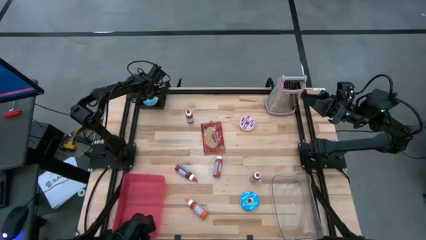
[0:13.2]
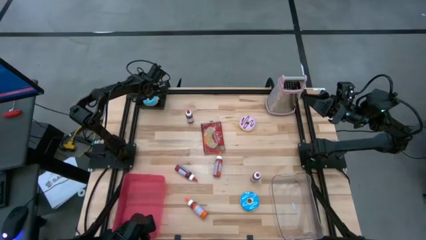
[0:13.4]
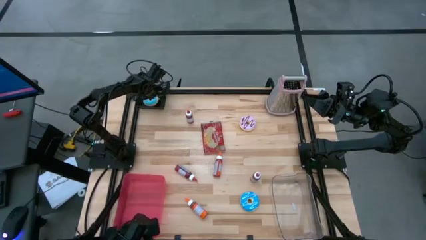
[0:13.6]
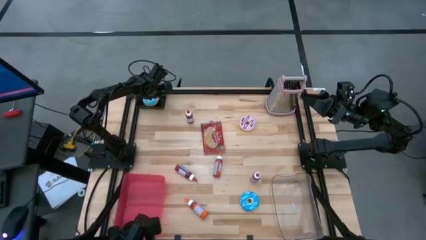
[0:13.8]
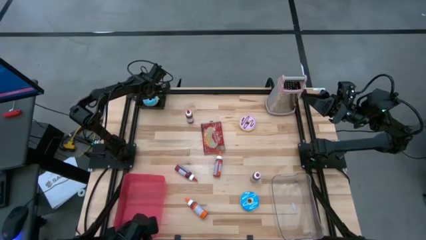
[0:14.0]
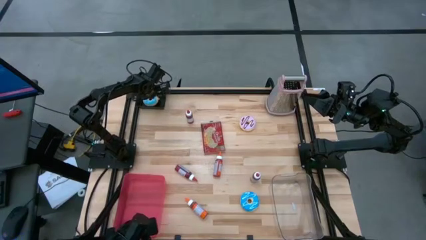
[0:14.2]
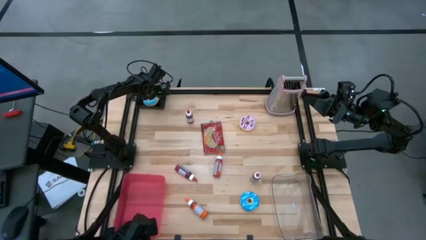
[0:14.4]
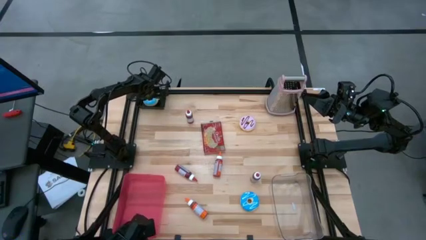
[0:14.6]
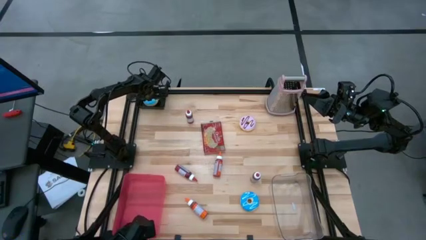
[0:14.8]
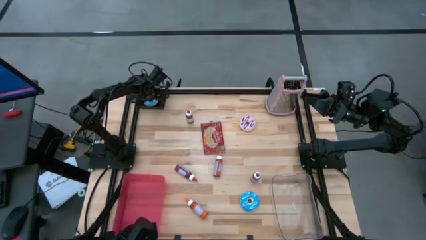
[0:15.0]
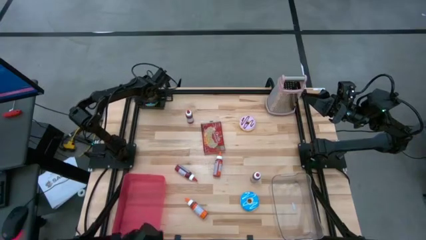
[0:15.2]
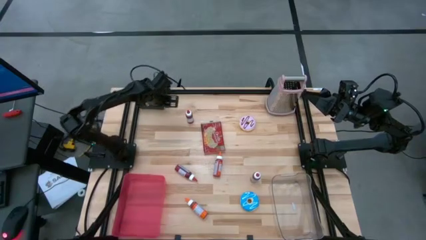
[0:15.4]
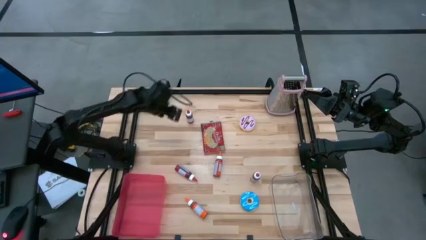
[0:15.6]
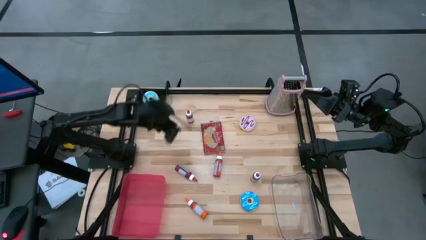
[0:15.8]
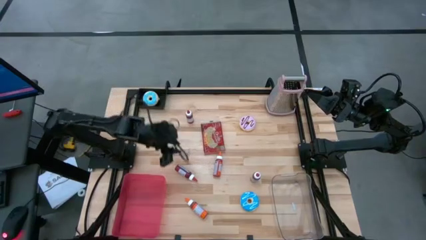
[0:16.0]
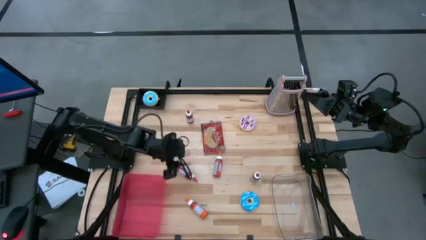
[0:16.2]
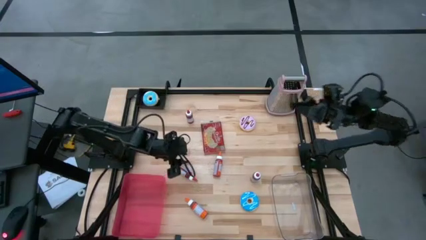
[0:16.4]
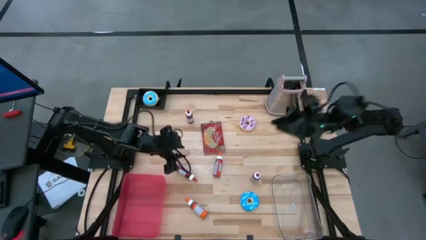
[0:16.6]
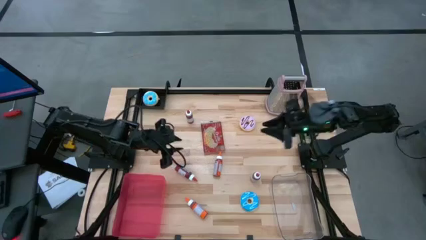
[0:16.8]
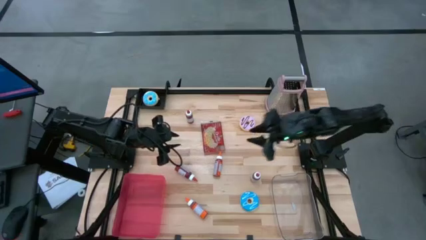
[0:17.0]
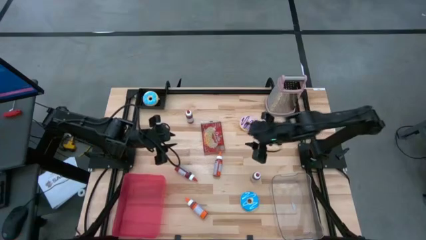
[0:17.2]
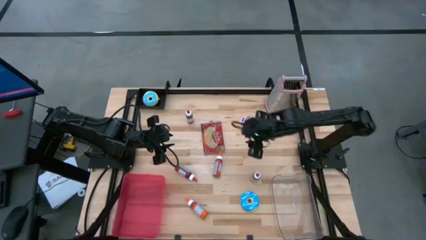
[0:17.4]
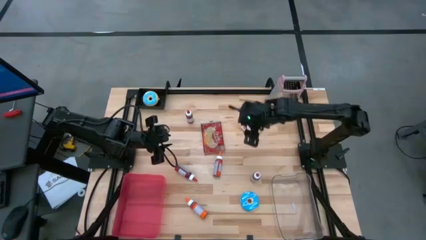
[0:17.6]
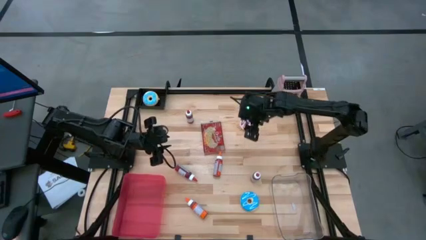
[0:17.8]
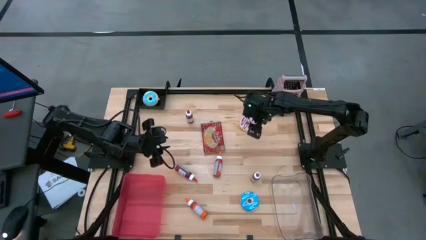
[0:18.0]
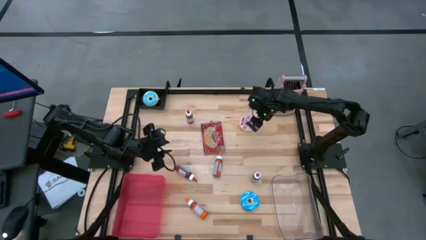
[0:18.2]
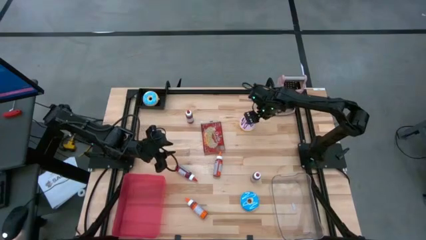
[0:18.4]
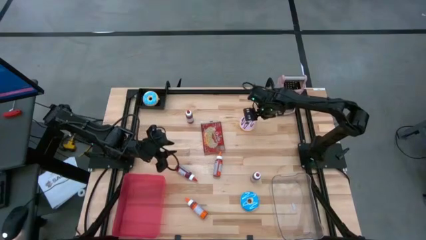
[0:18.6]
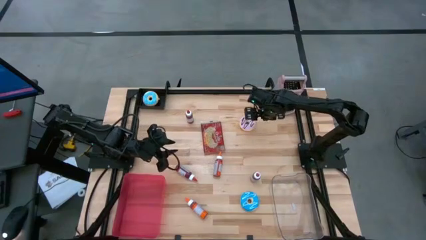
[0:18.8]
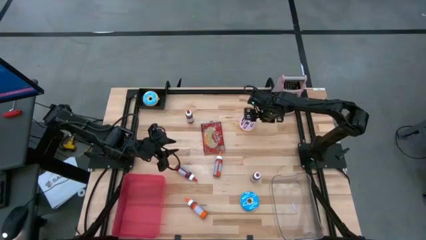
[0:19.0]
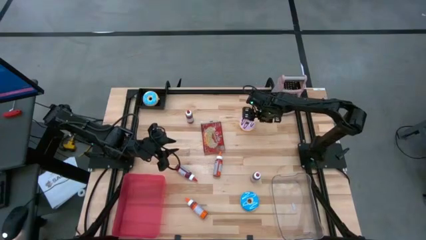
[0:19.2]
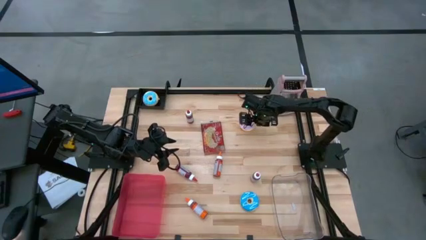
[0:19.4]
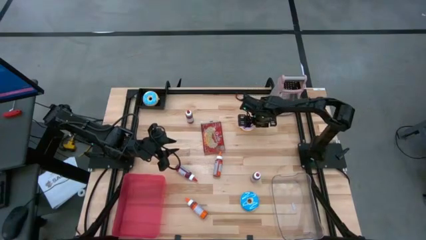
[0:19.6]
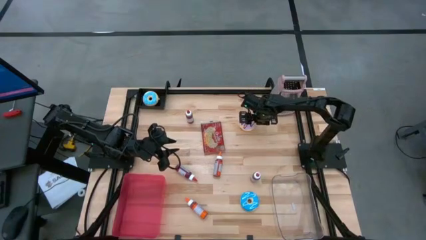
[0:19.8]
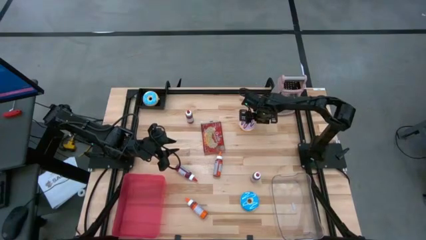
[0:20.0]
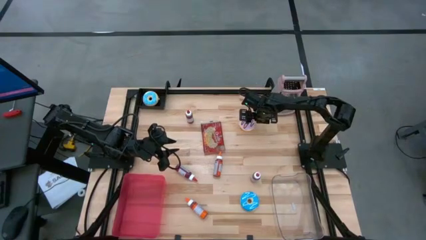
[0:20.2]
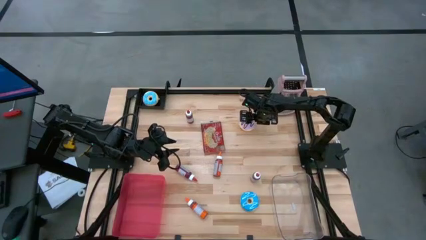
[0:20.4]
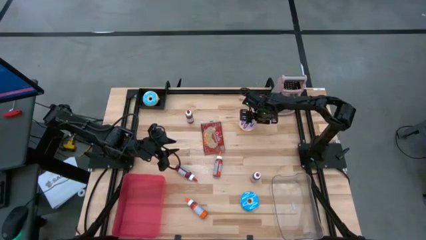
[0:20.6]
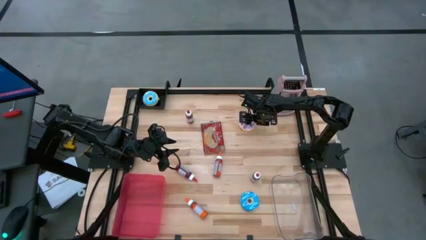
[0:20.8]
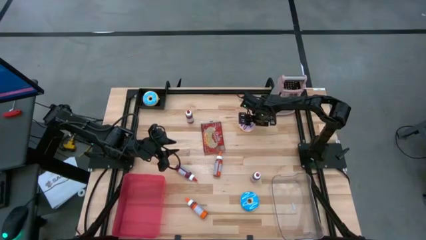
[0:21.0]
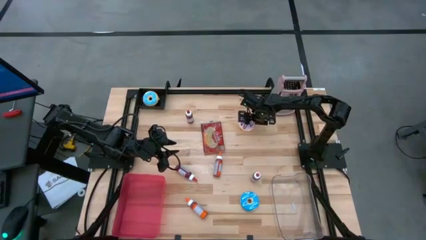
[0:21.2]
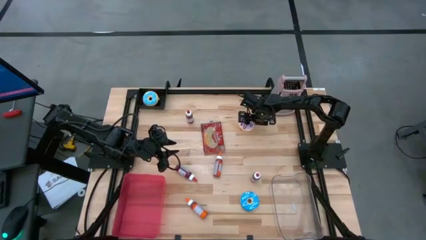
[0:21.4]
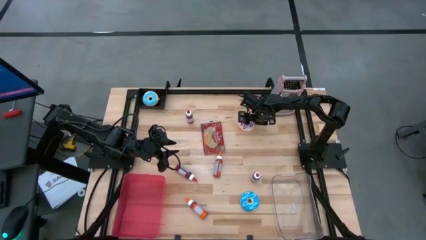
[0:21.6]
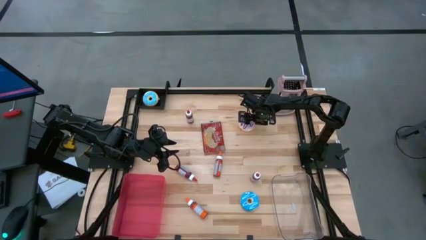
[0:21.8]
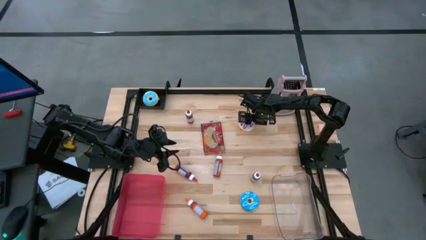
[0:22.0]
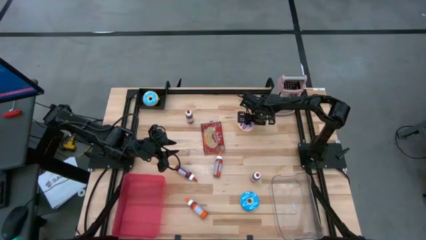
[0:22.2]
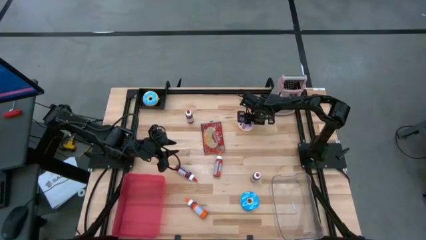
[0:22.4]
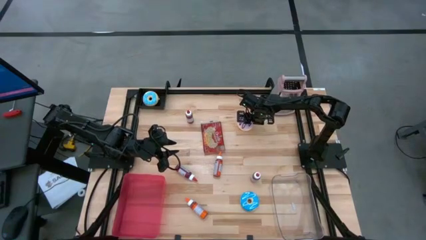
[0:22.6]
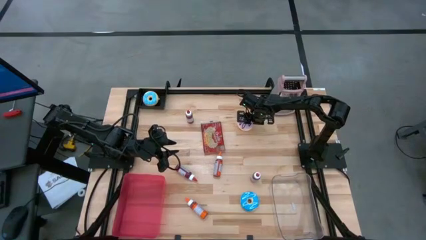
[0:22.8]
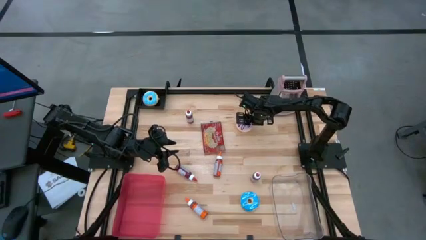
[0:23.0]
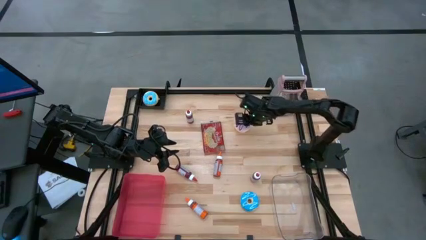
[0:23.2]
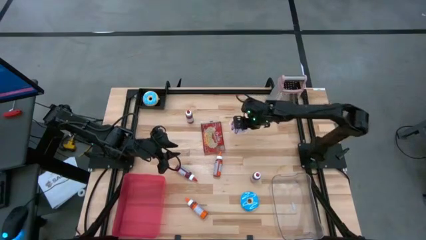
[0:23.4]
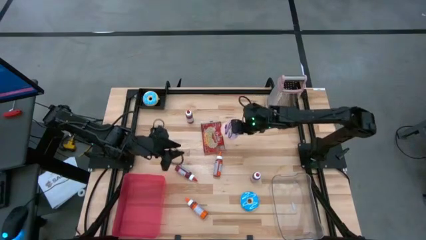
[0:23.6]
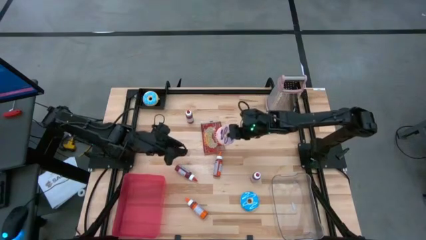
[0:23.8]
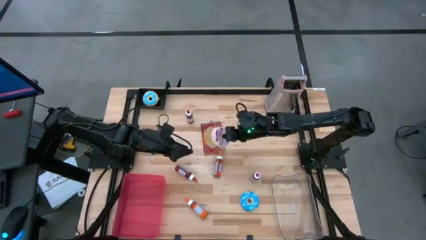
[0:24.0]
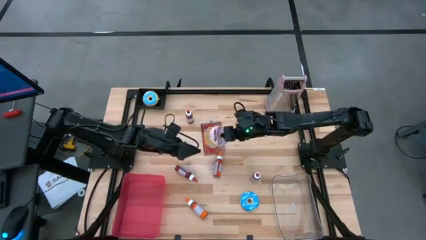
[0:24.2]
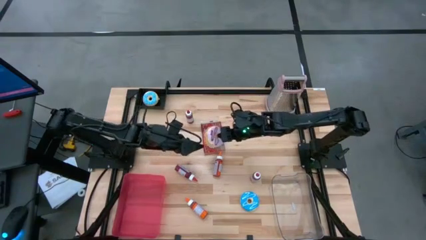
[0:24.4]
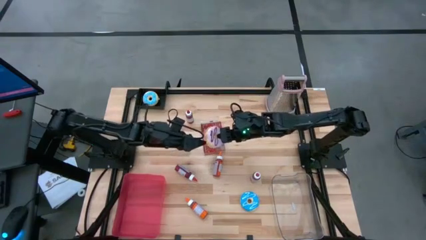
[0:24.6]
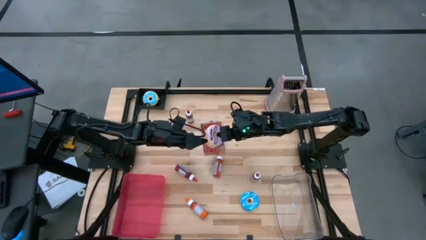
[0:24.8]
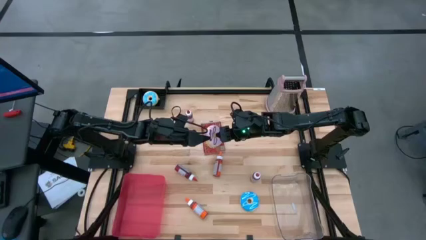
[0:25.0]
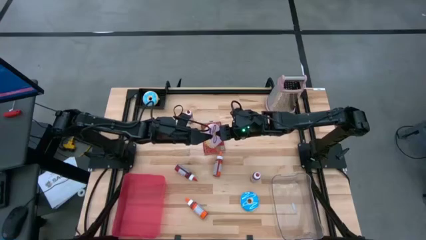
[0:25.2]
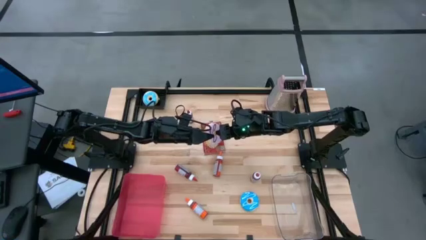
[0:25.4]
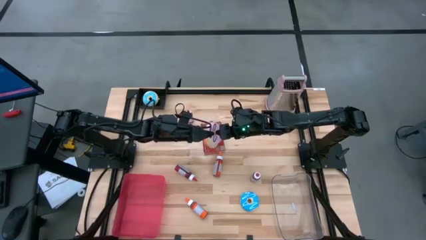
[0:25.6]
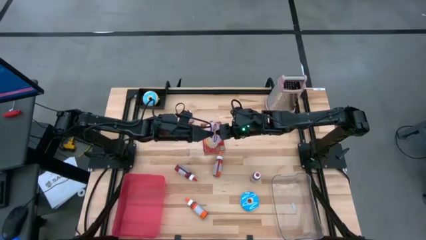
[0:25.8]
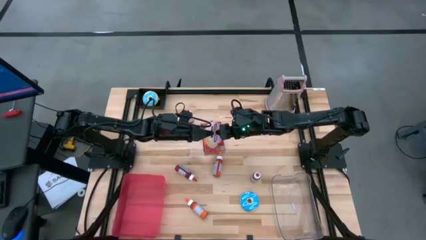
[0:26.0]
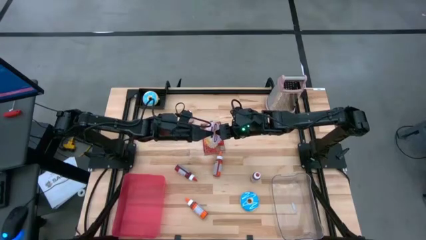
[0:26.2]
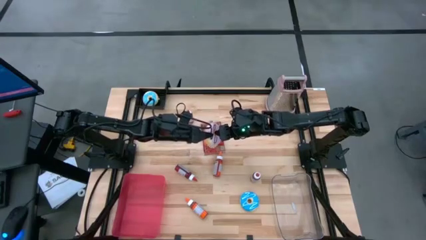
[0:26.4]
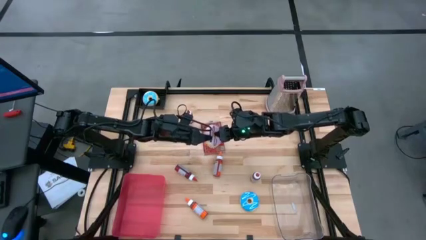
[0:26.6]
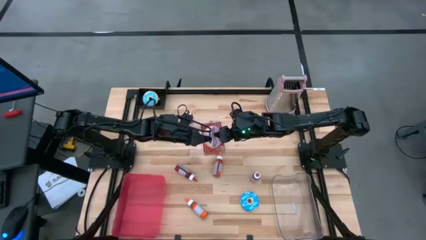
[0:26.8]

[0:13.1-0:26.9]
Put the purple donut into the black bin
